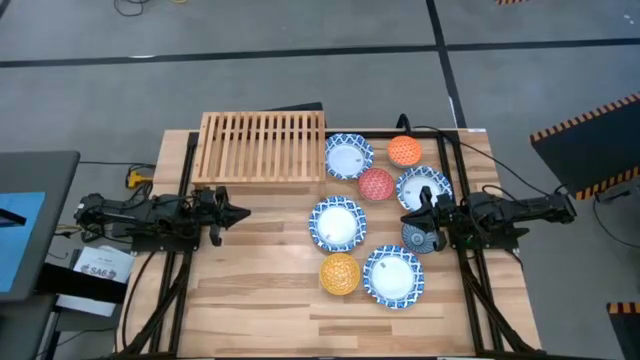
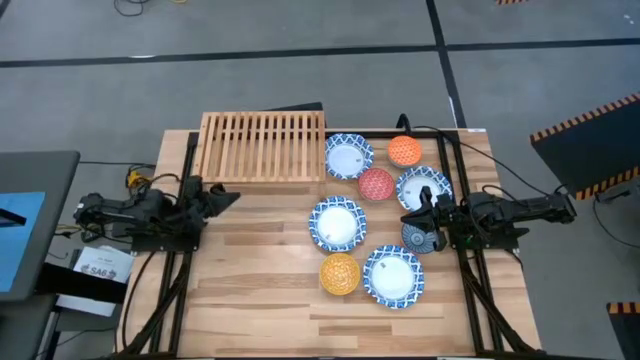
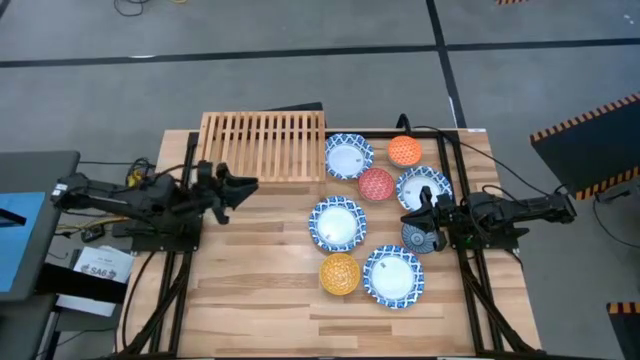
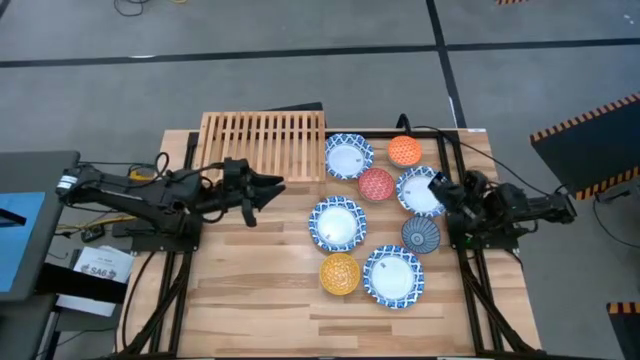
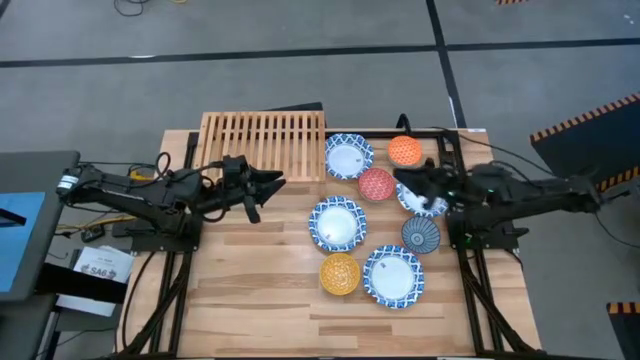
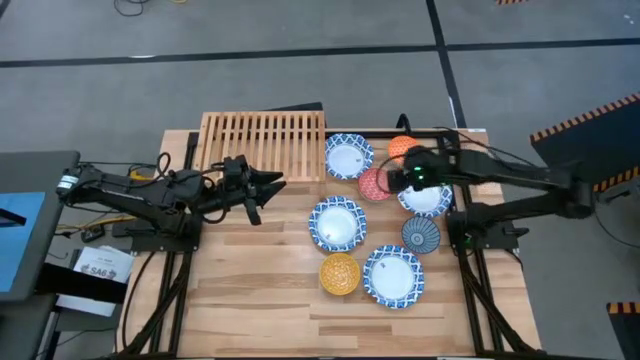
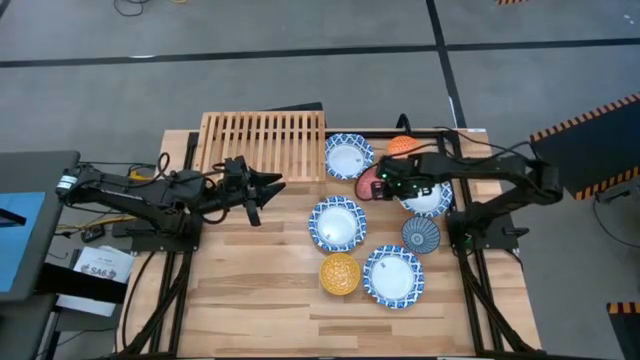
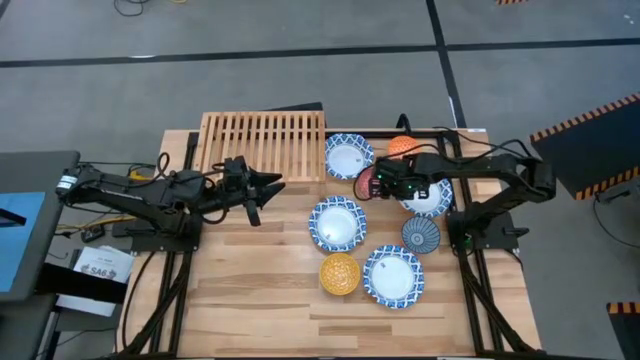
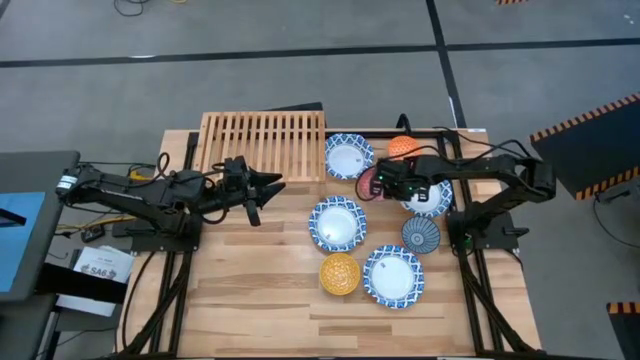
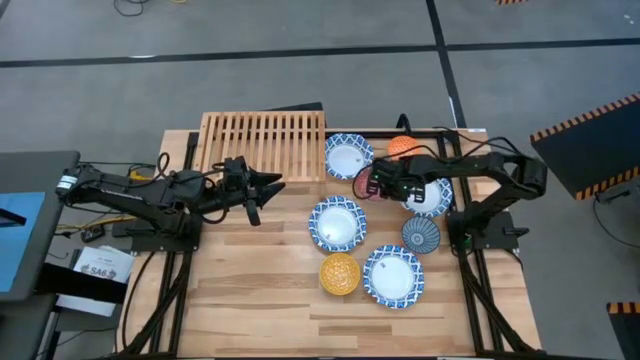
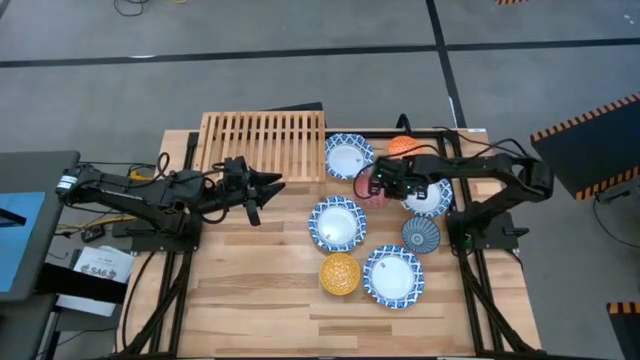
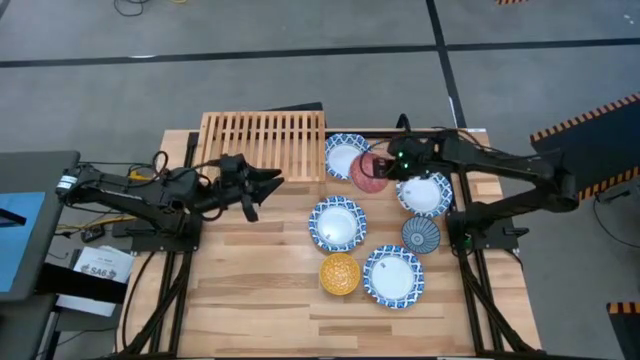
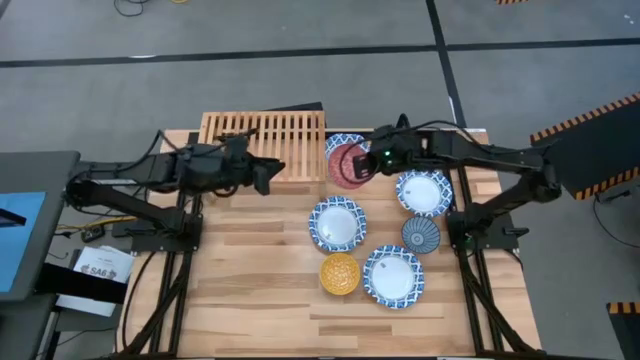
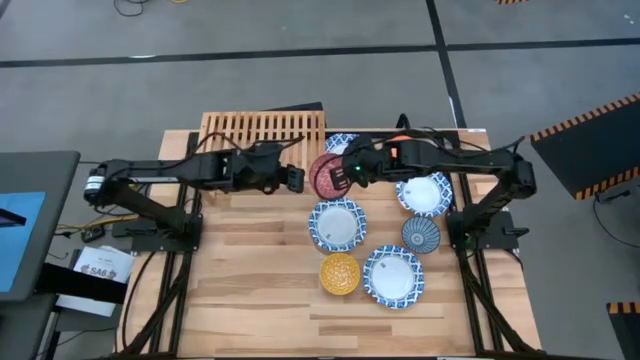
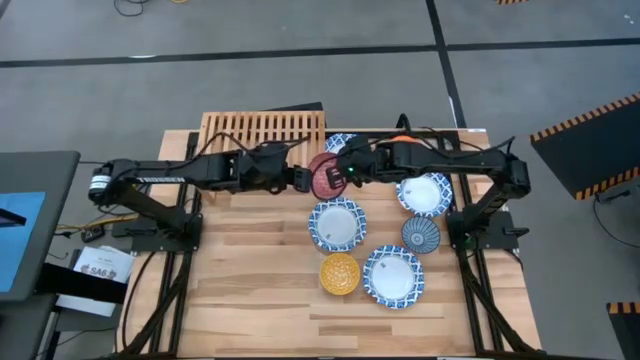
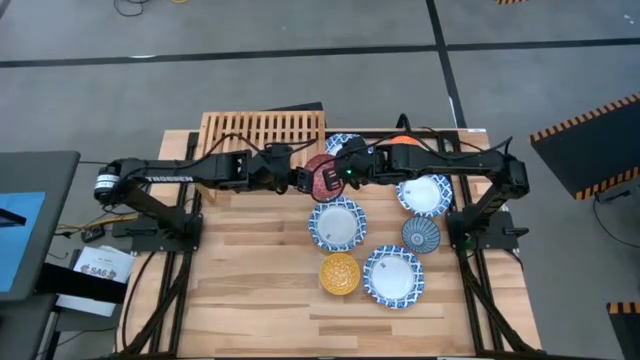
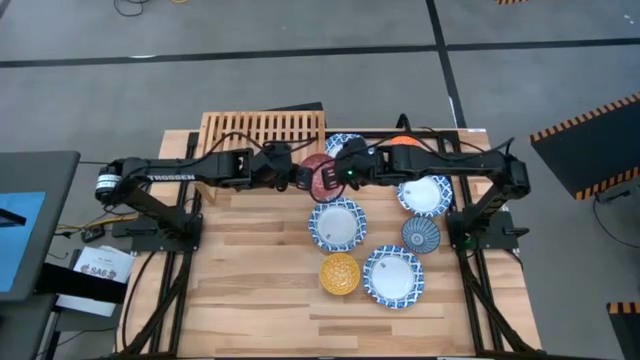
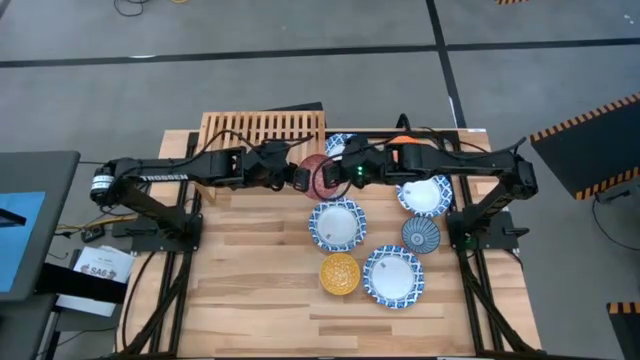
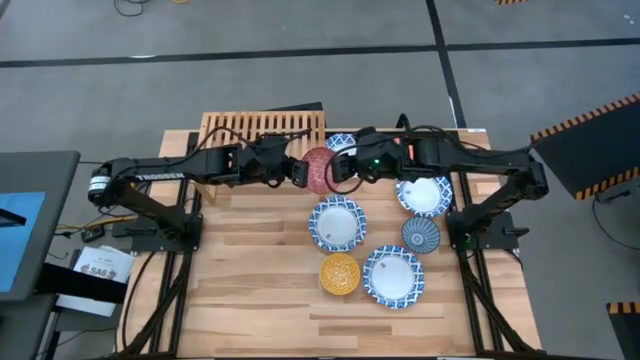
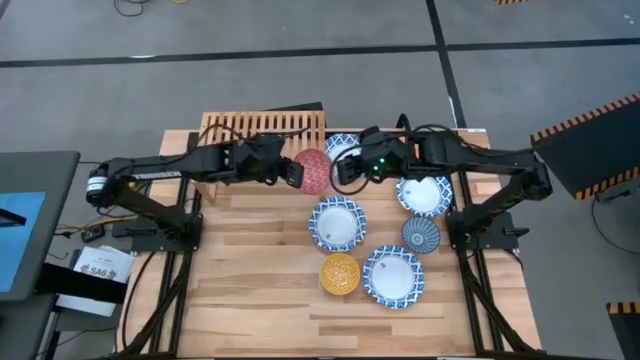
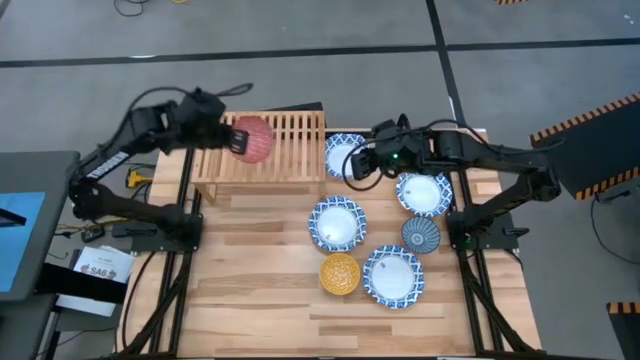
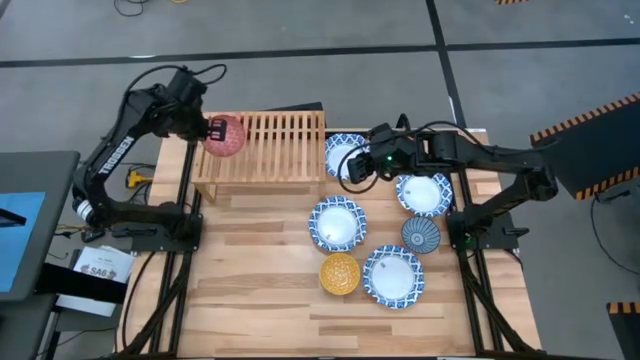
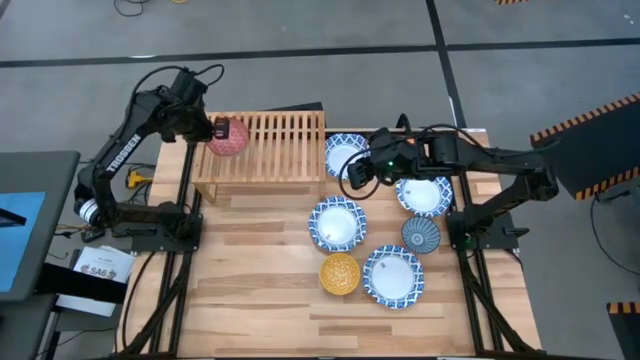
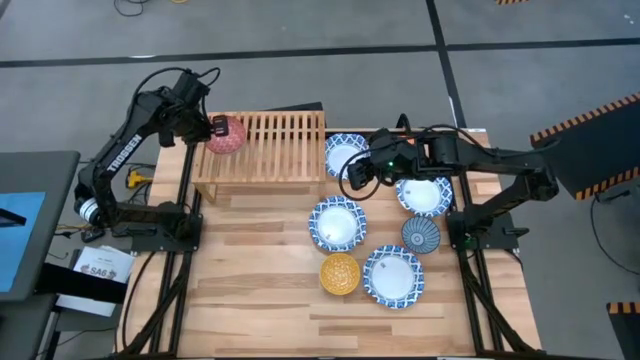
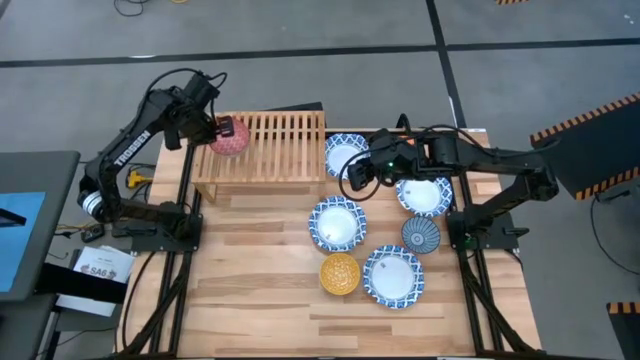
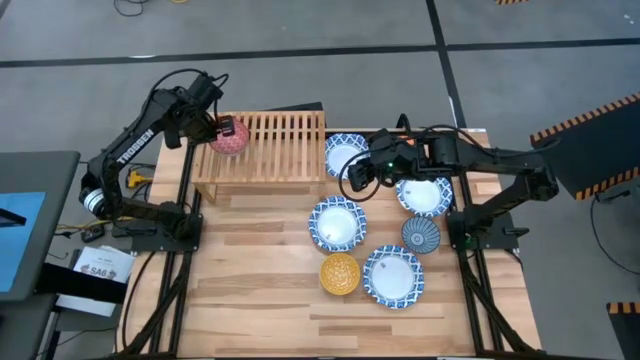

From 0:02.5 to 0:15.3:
Task: Place and stack bowls onto a shelf
Put the small red bowl on the shelf

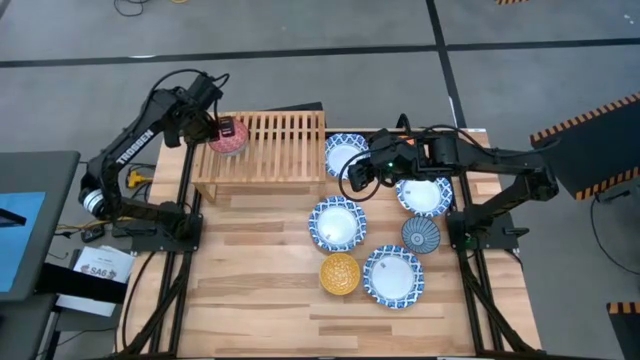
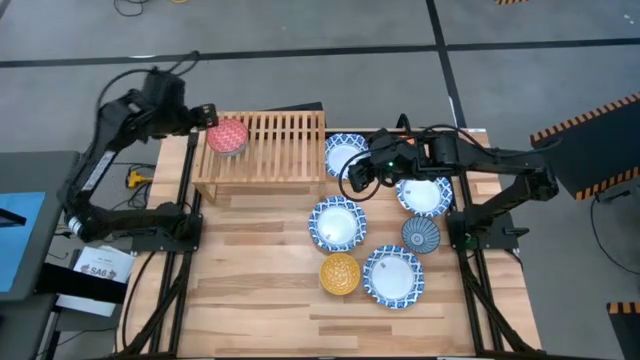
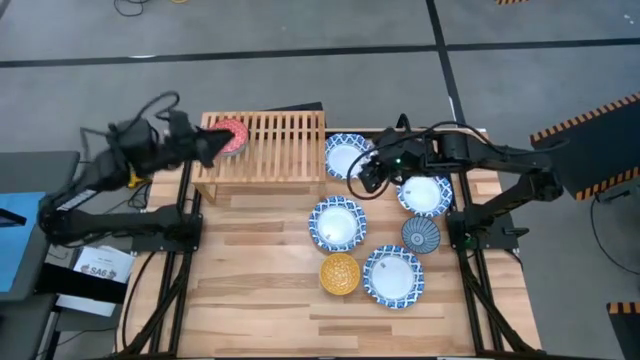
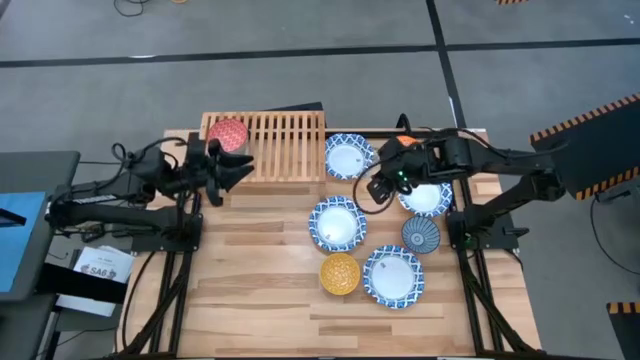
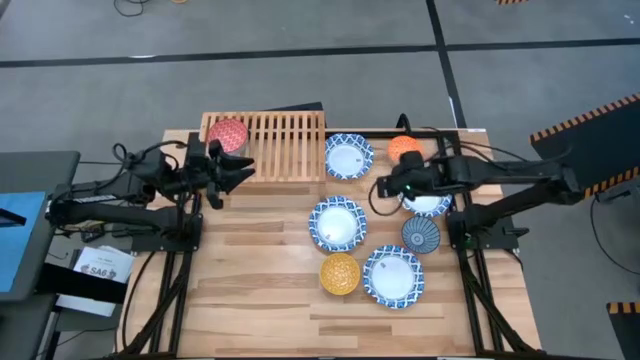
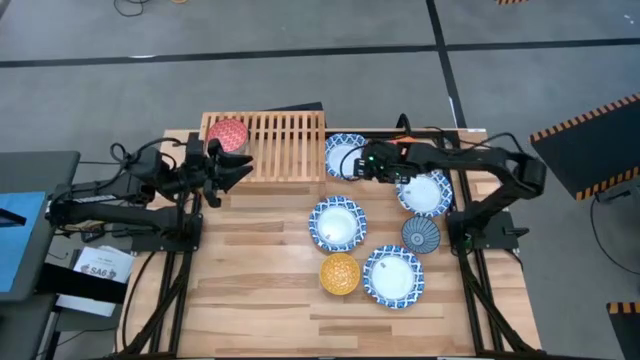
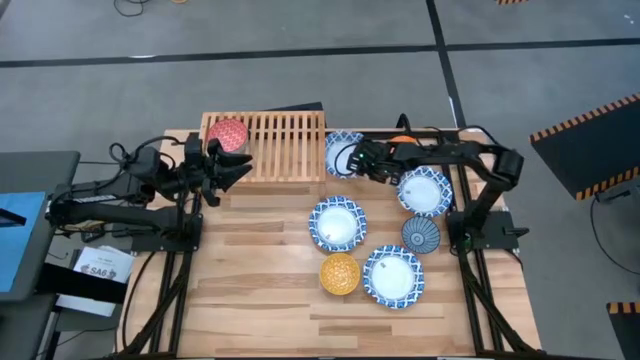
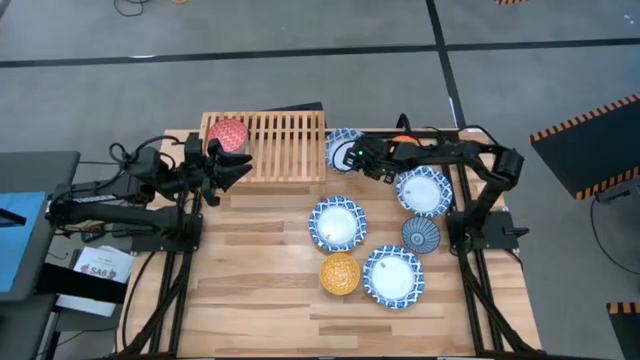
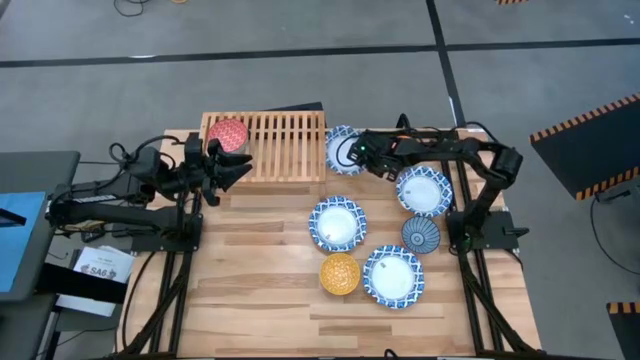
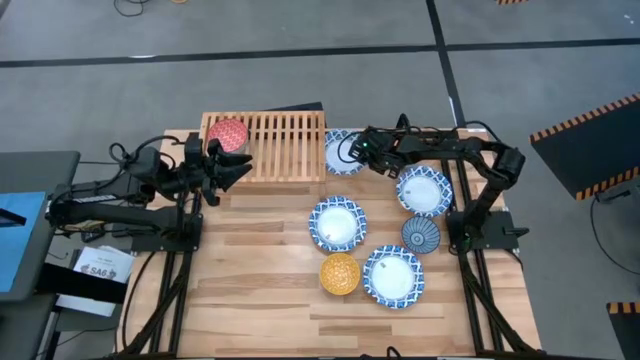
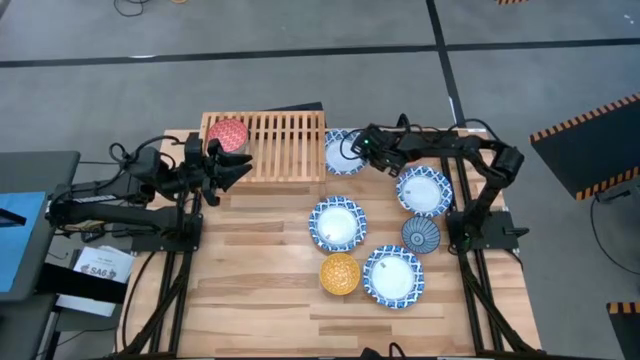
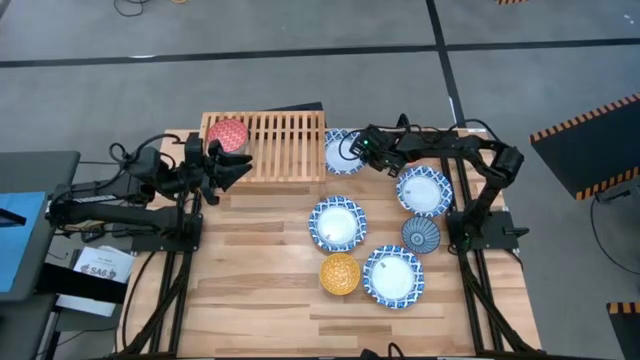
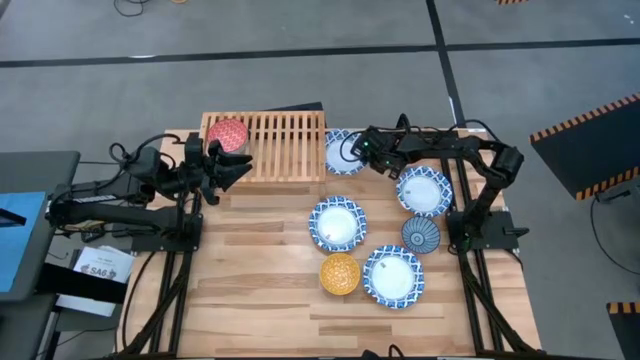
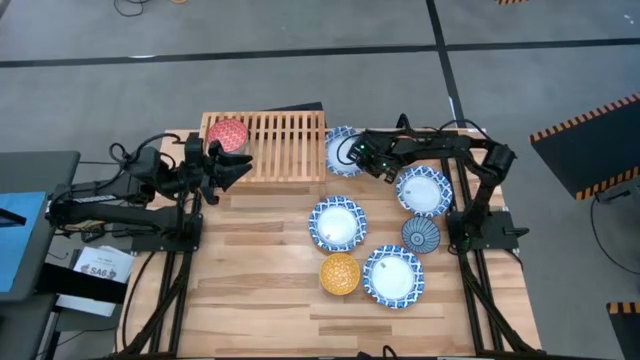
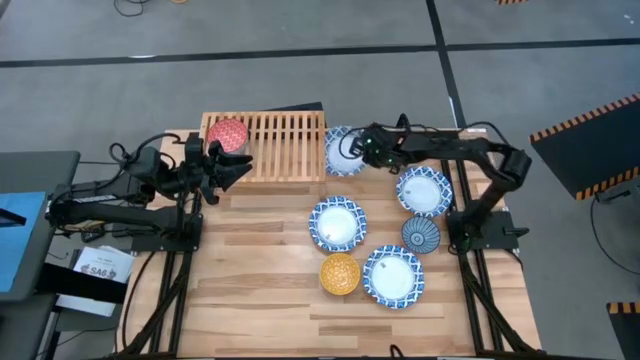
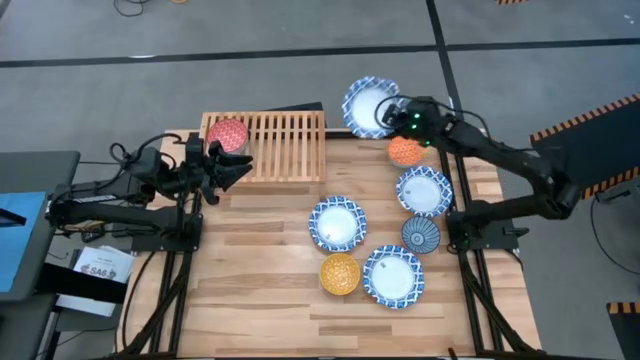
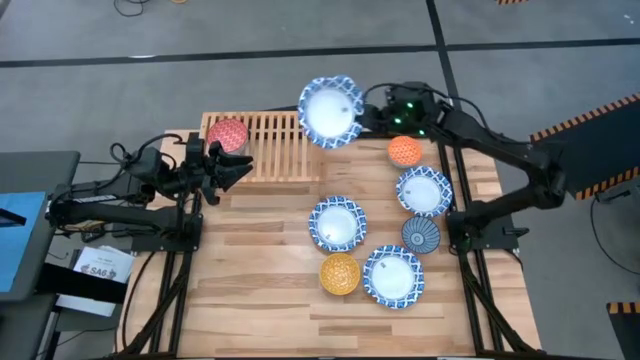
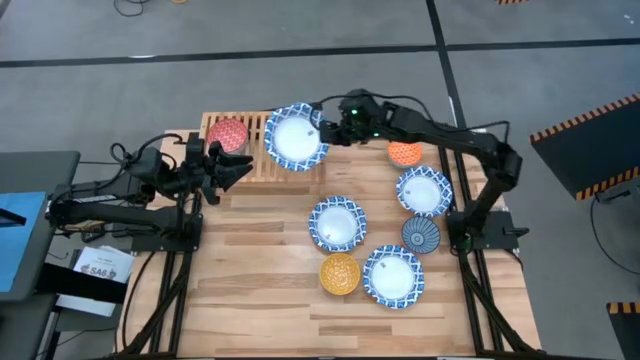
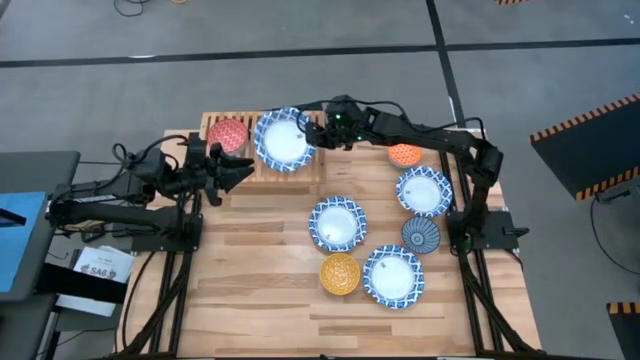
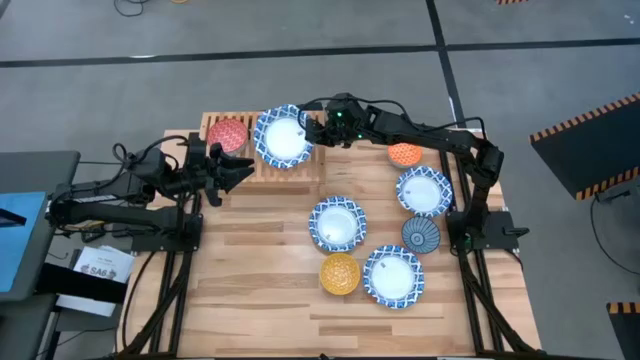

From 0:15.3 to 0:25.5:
Put the large white bowl on the shelf
